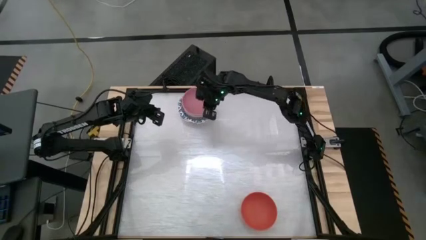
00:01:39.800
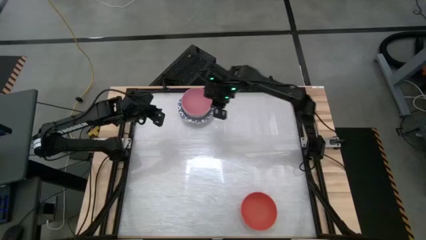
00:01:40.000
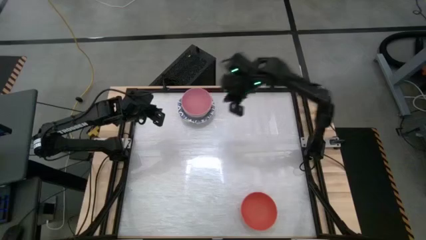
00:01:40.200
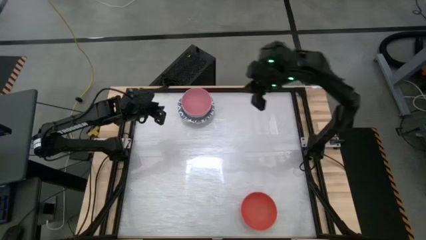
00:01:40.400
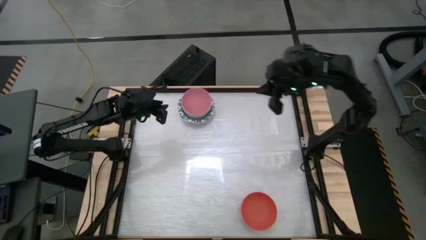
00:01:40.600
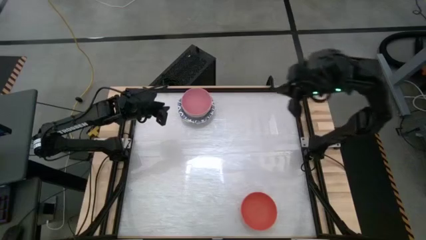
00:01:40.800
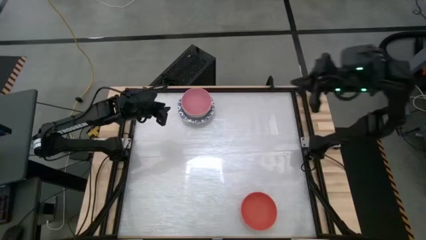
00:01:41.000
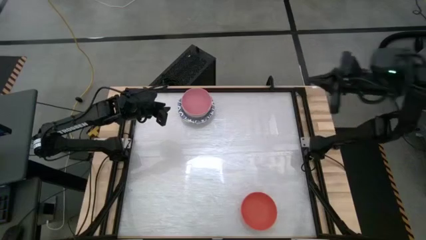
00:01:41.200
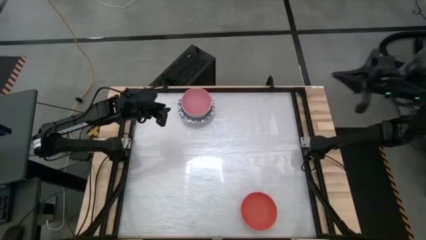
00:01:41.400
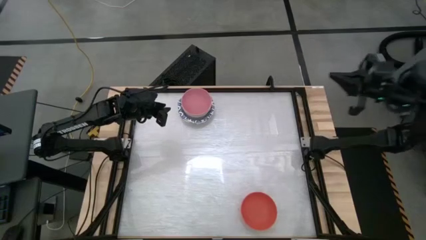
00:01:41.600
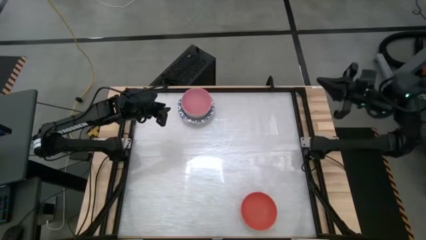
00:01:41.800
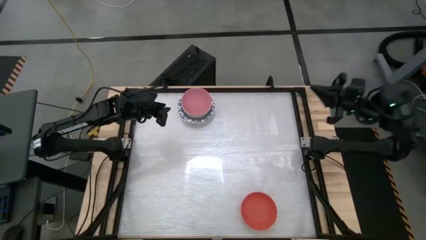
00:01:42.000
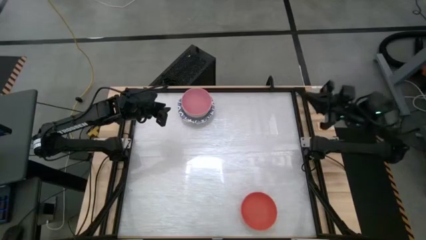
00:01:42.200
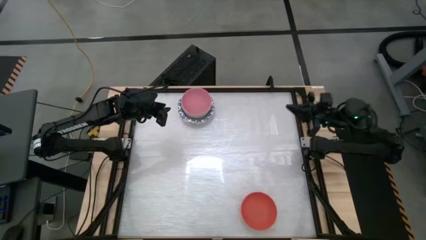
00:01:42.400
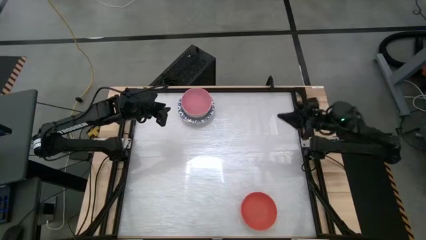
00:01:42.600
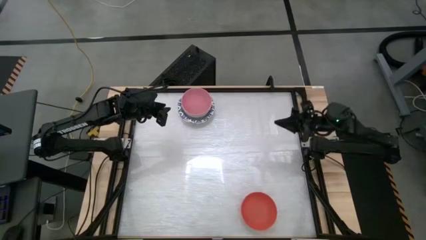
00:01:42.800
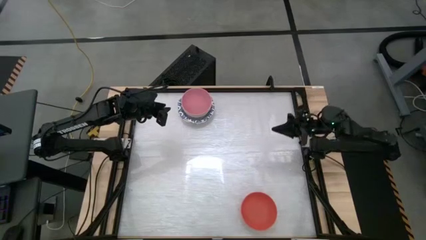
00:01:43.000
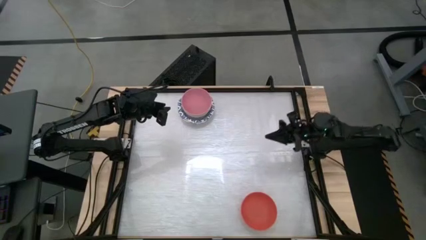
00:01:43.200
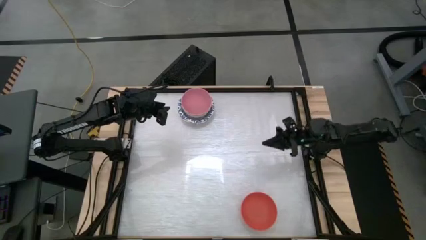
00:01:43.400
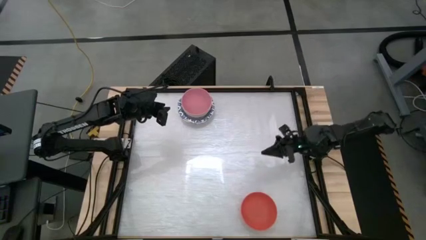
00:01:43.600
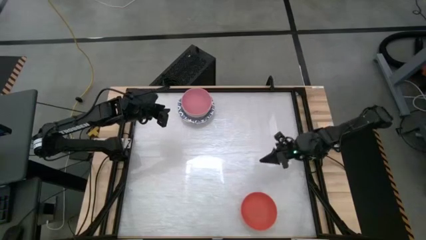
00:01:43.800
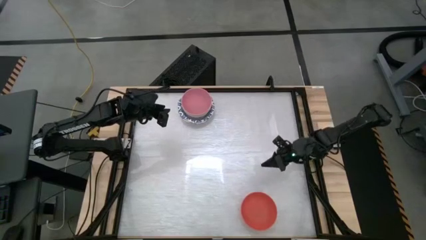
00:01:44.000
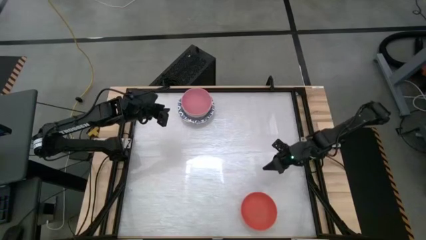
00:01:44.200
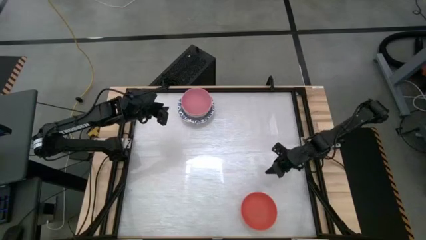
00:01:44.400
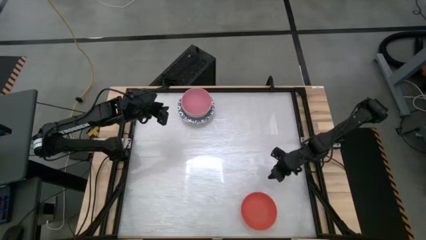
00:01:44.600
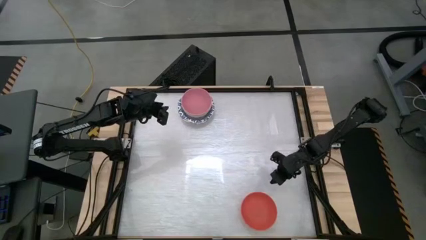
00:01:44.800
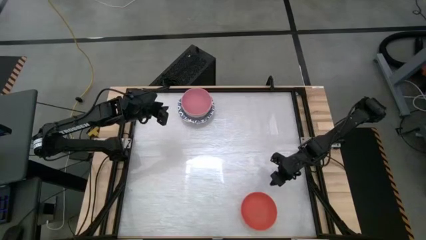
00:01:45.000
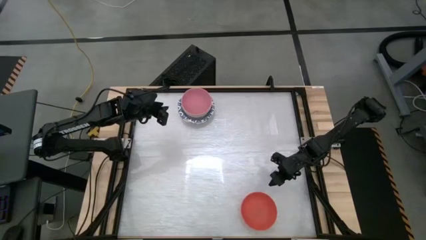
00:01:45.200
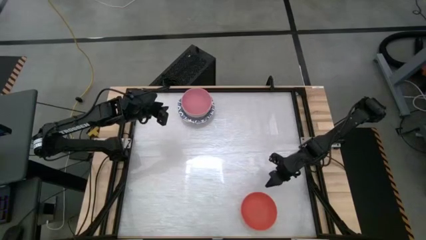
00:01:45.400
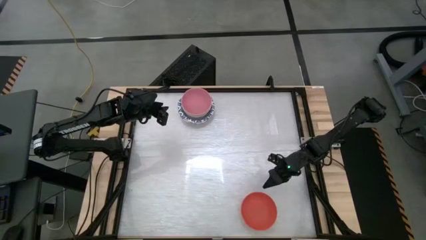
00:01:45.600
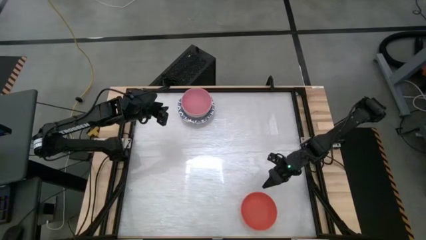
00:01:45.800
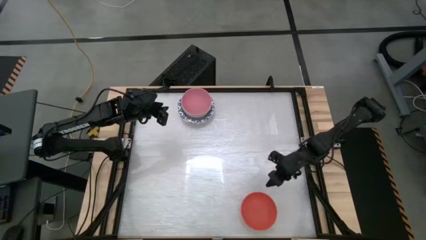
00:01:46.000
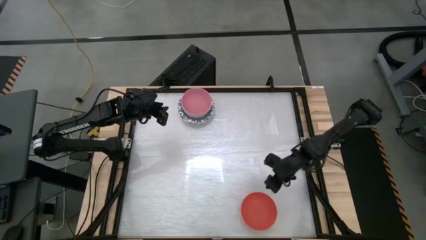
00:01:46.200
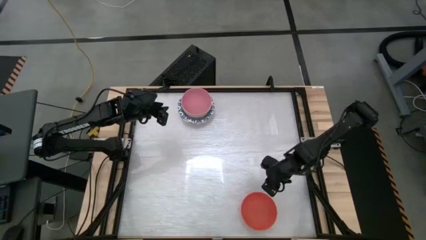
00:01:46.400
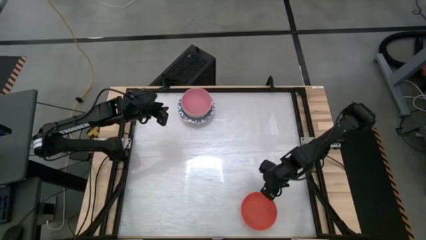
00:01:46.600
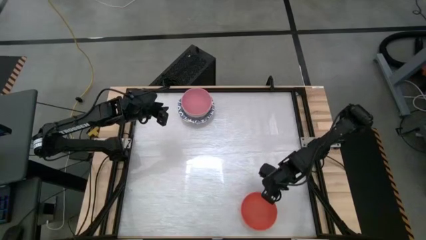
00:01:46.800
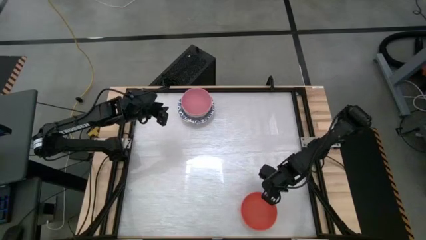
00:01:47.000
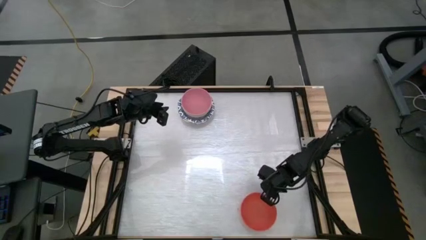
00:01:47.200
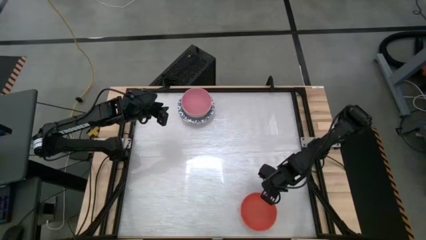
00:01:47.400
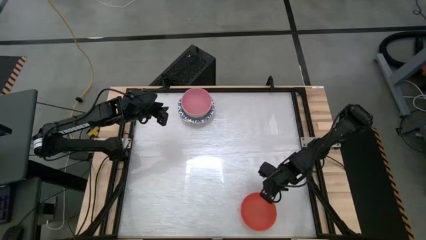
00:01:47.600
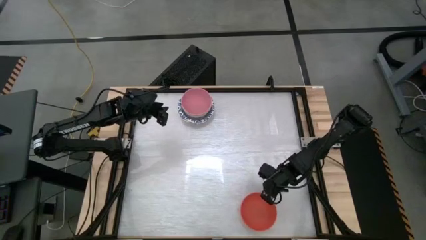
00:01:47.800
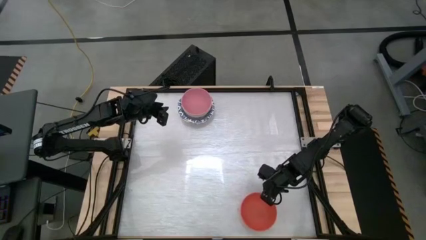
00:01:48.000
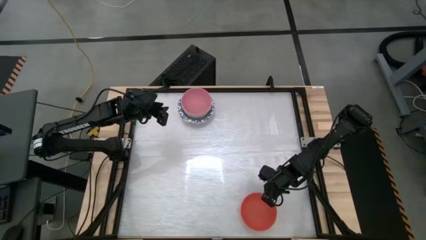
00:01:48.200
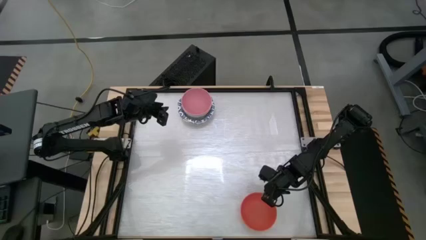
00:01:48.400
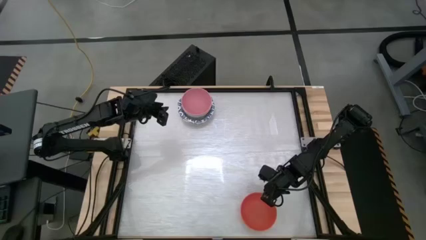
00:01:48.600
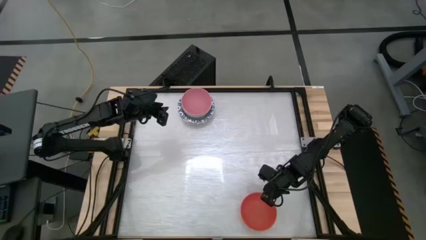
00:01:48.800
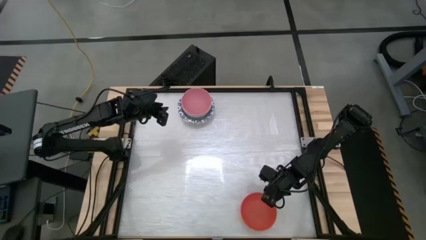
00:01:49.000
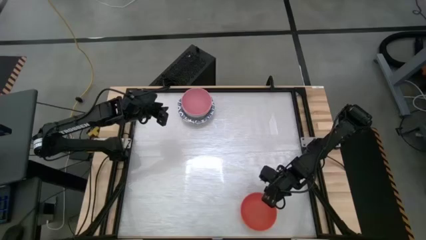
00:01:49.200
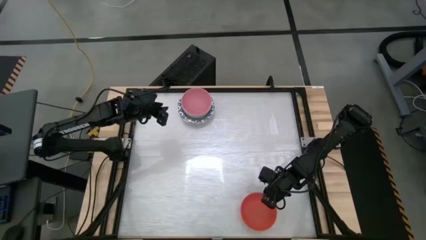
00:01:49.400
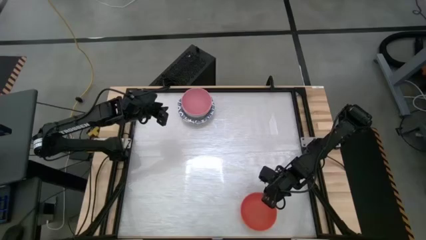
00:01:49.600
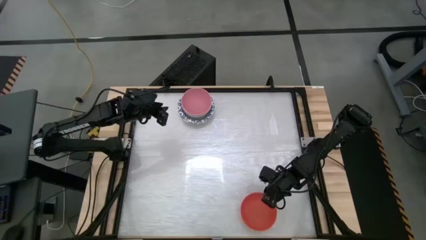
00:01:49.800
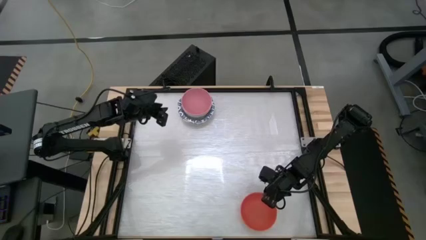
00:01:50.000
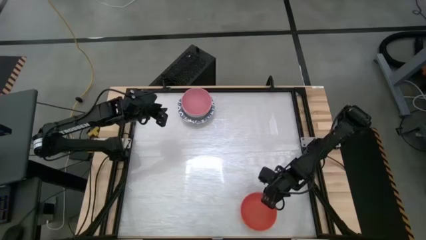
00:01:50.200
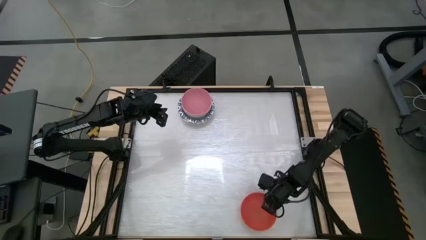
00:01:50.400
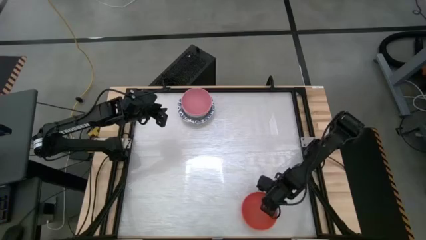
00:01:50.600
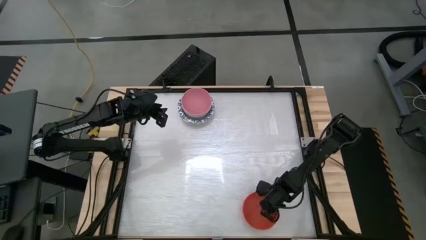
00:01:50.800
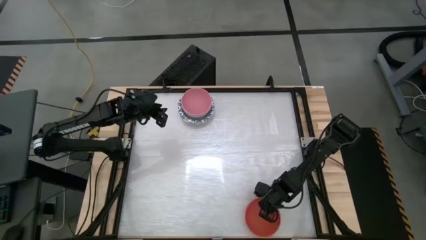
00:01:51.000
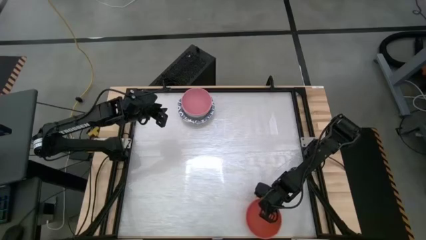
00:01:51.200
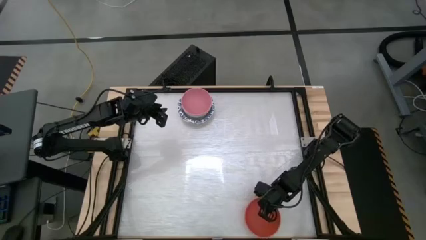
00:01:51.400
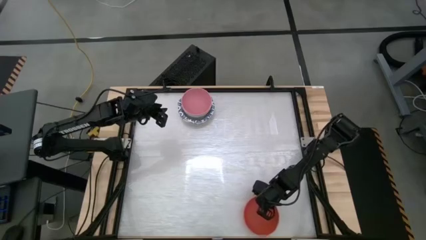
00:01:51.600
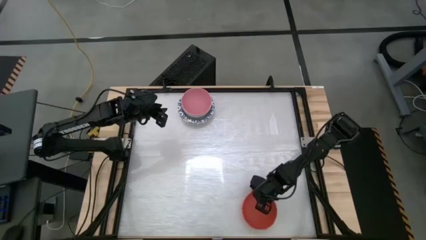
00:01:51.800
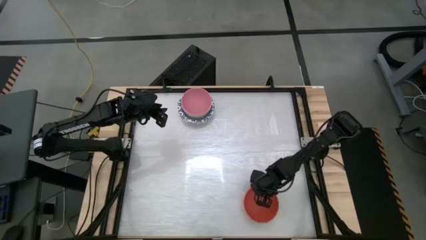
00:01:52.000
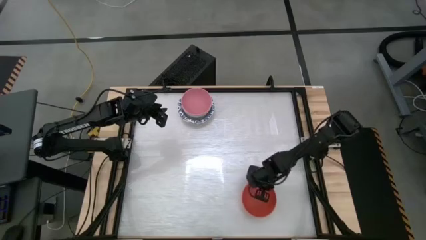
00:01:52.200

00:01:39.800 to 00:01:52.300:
Stack the orange bowl on top of the pink bowl
